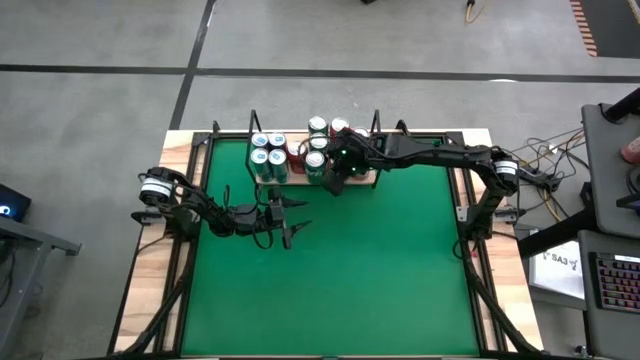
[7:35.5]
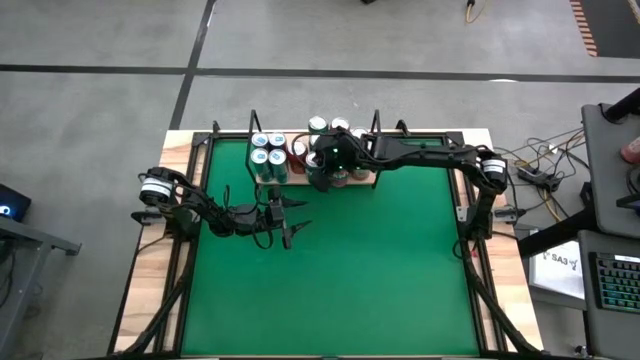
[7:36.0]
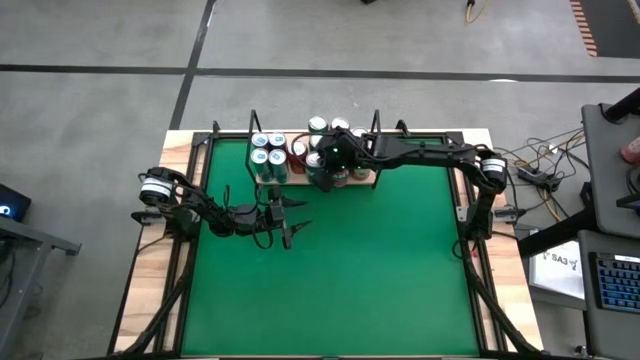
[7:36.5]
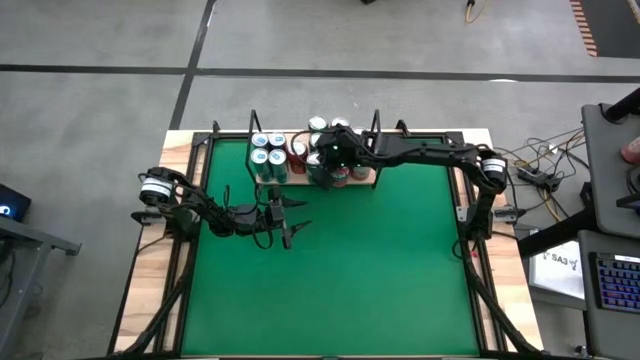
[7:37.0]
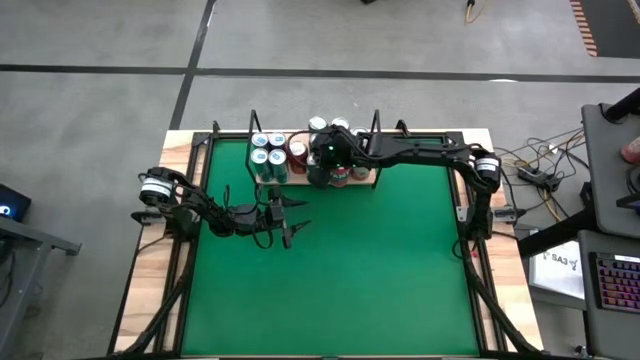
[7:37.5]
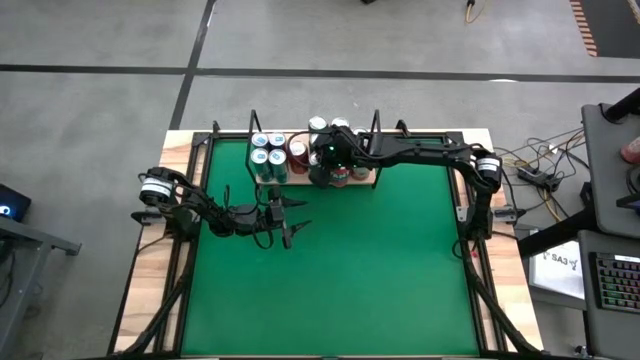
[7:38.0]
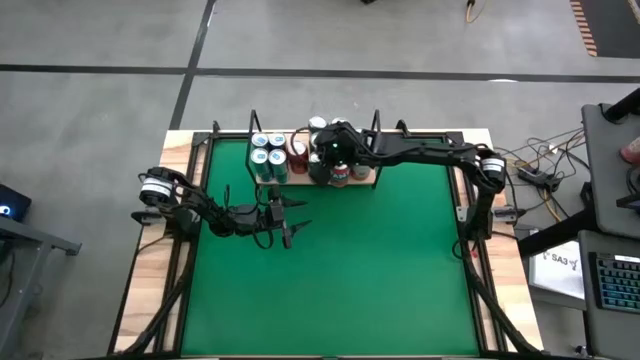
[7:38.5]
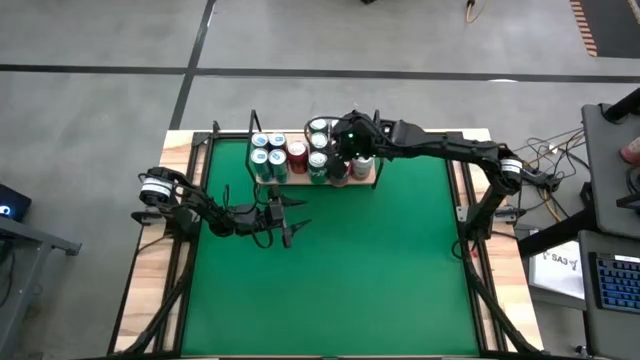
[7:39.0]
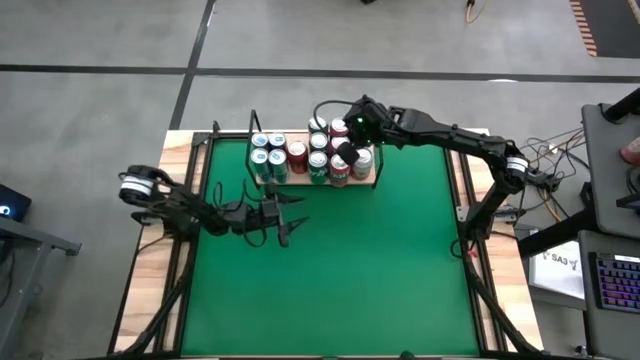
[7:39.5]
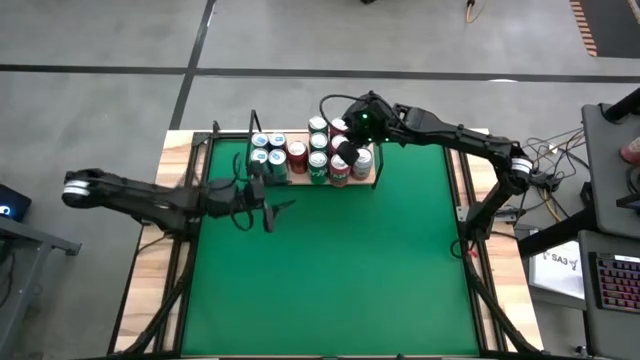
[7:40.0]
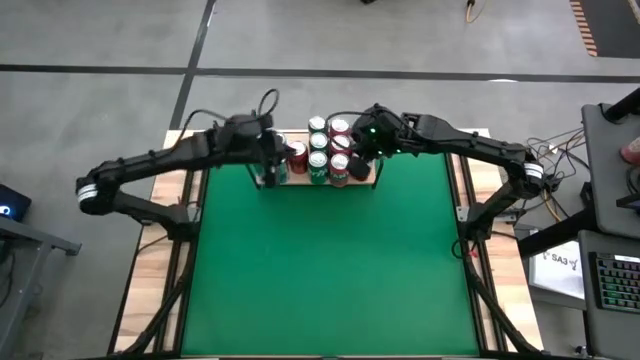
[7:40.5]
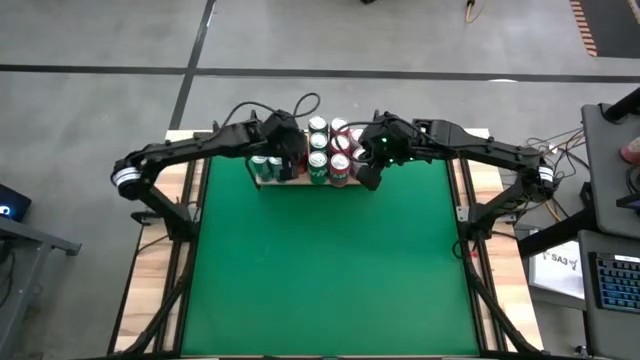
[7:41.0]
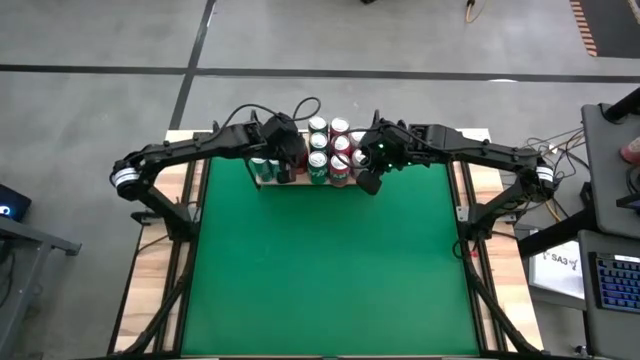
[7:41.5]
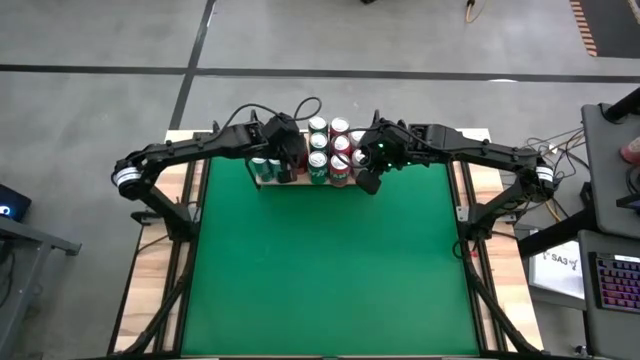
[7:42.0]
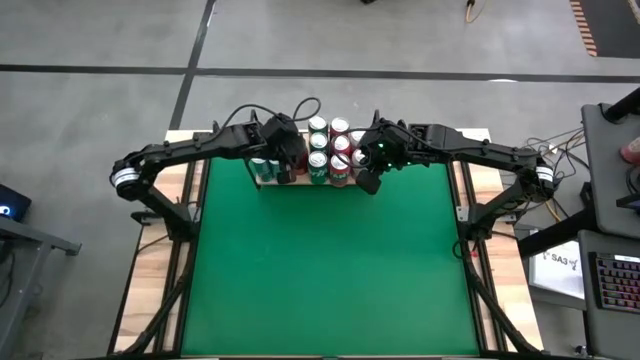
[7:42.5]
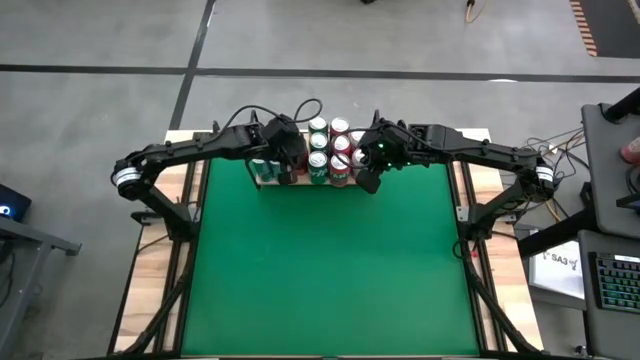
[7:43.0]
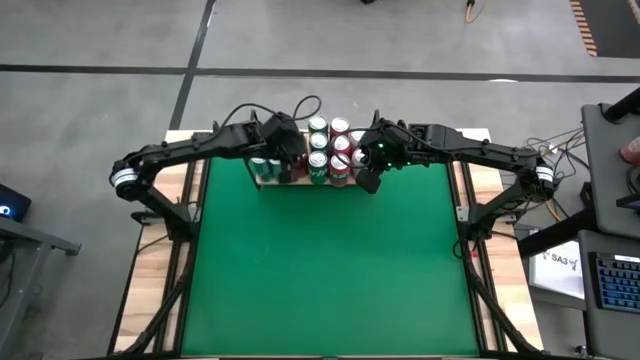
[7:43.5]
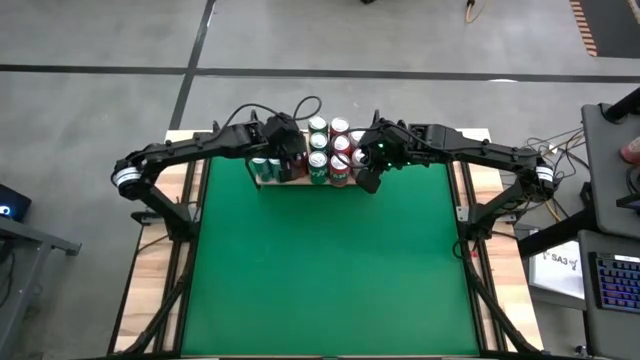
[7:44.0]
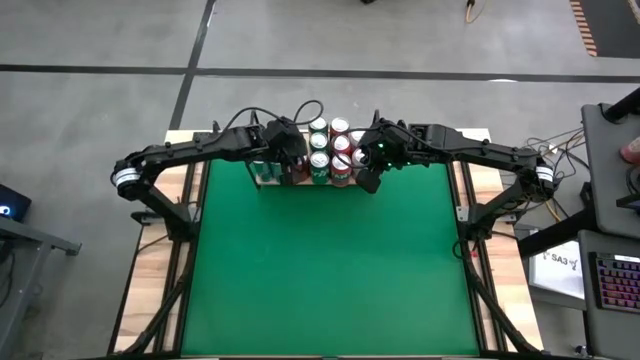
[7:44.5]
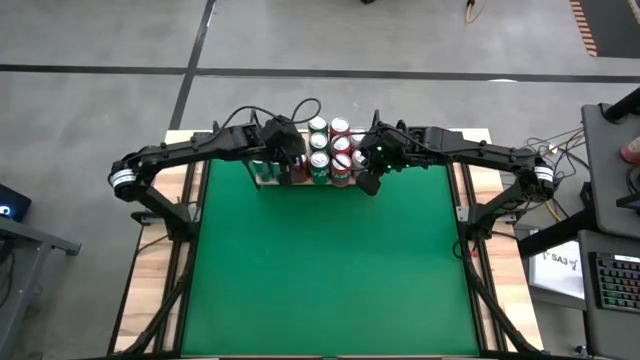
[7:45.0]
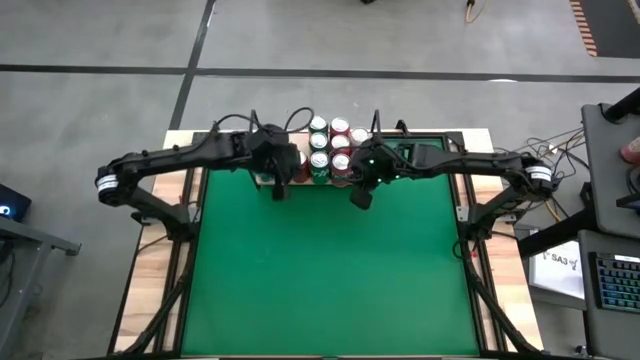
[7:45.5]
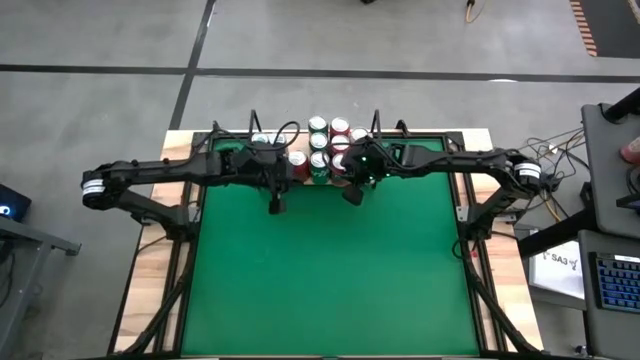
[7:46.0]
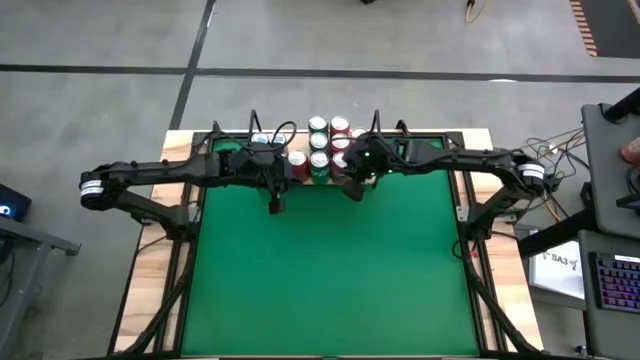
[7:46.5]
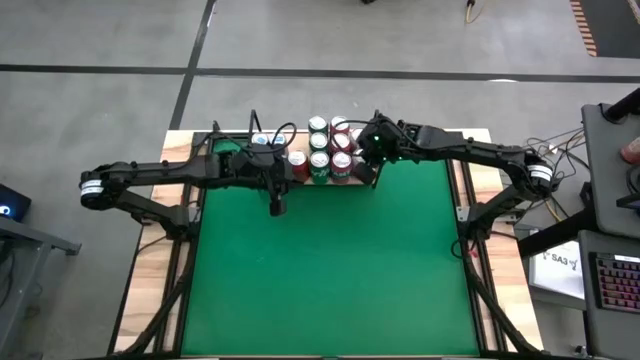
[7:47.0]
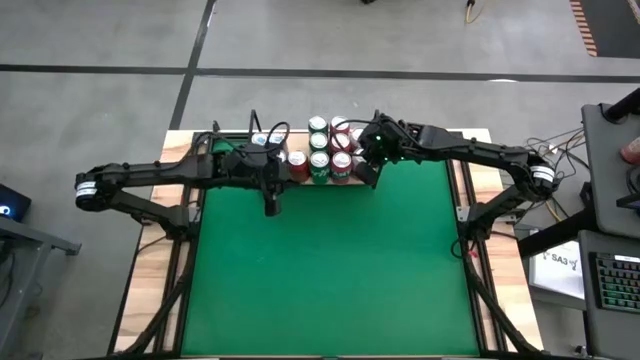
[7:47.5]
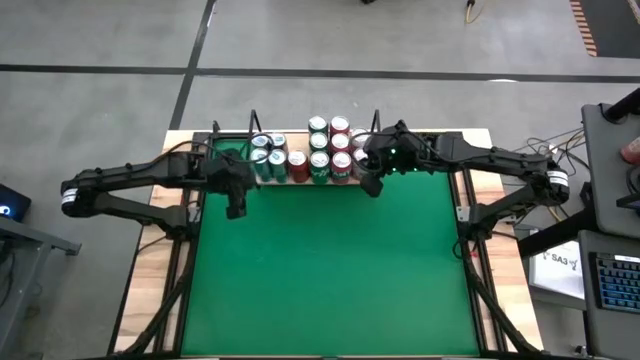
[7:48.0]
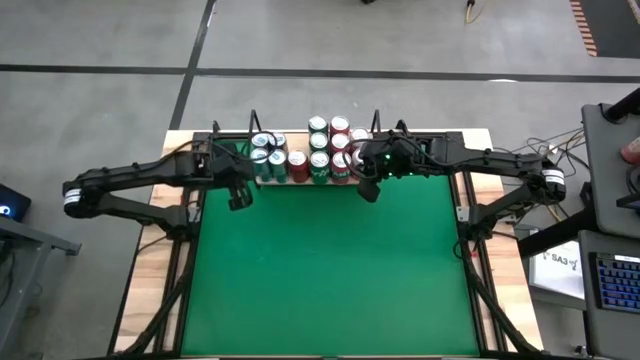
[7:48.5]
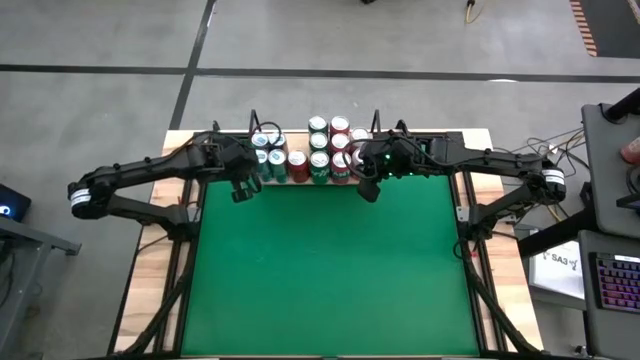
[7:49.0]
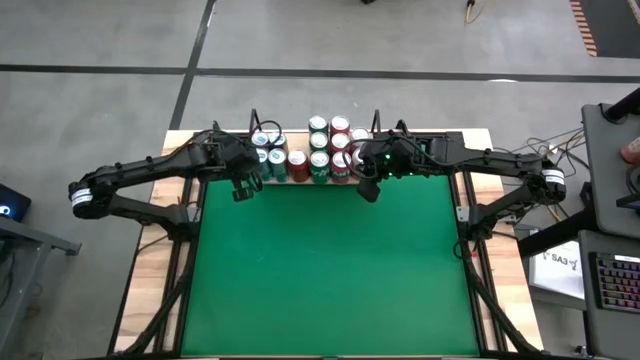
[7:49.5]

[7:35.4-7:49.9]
Task: Pick and place cans onto a shelf
Adjust the soda cans on the shelf

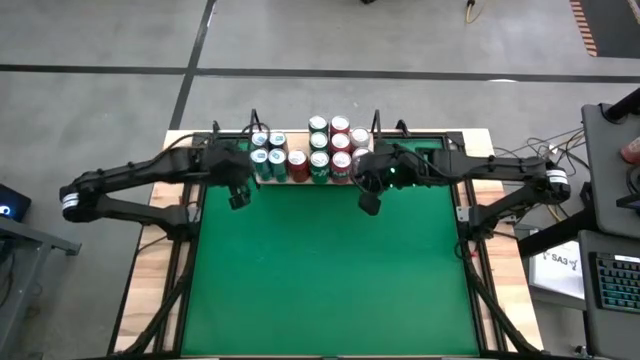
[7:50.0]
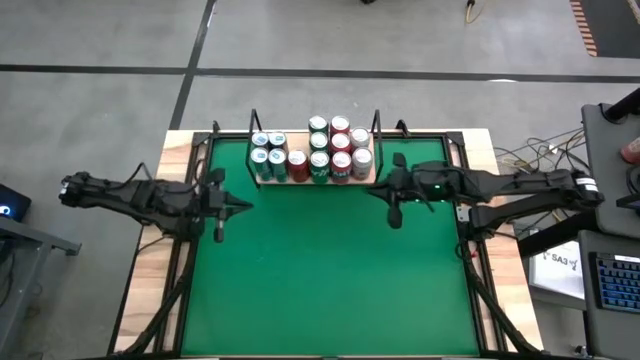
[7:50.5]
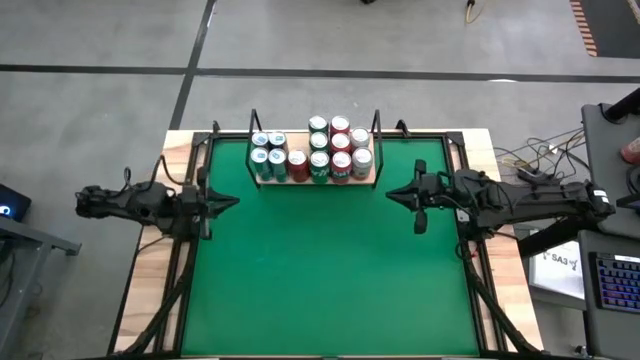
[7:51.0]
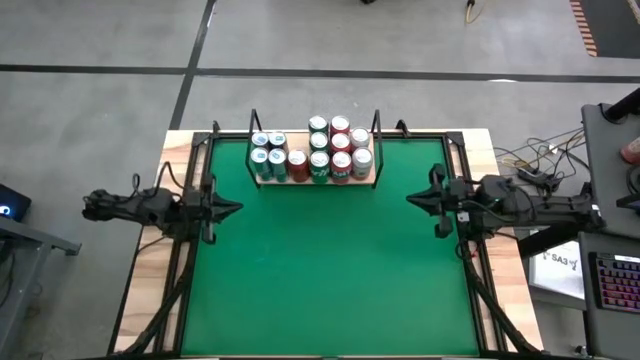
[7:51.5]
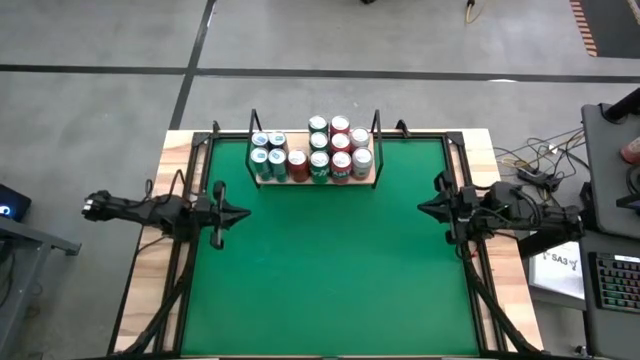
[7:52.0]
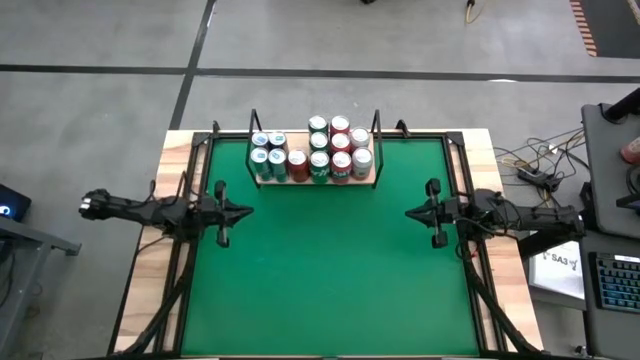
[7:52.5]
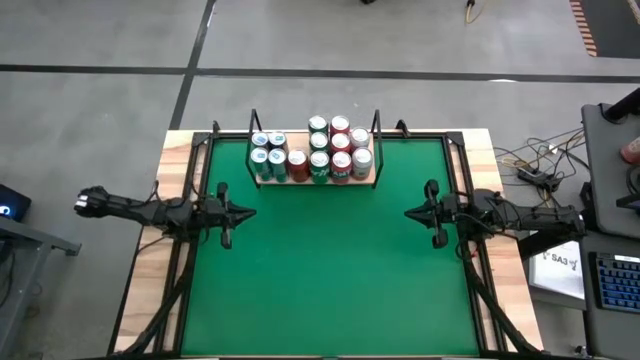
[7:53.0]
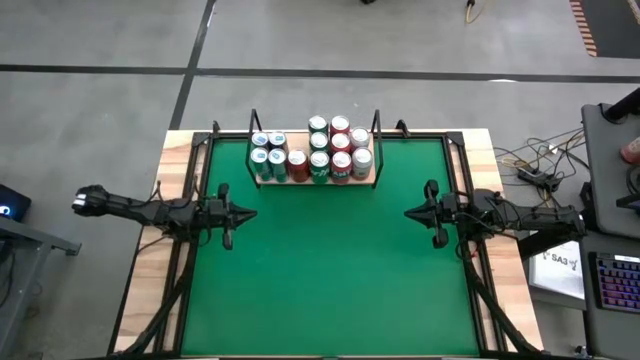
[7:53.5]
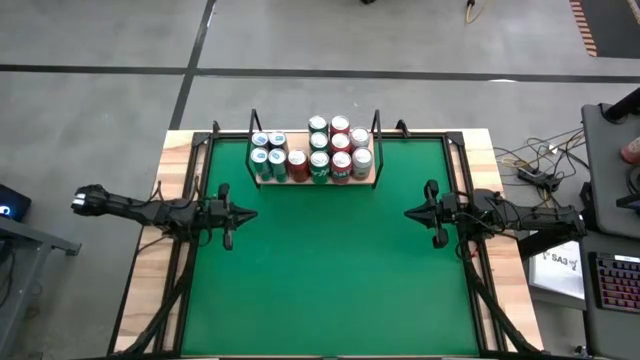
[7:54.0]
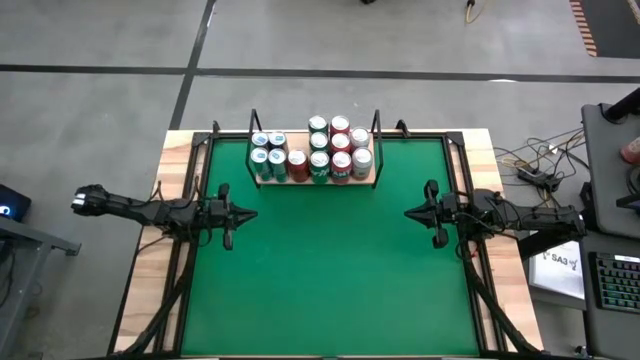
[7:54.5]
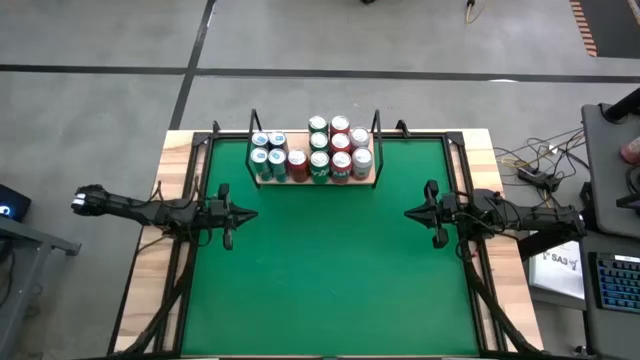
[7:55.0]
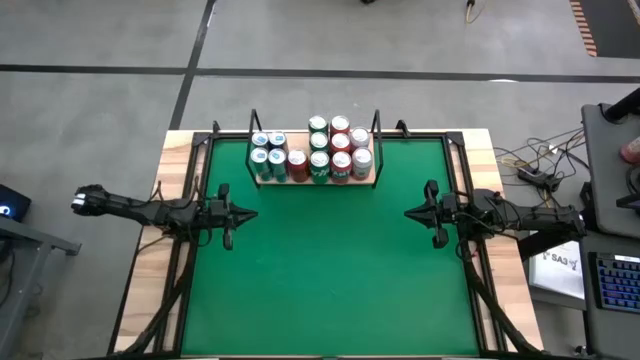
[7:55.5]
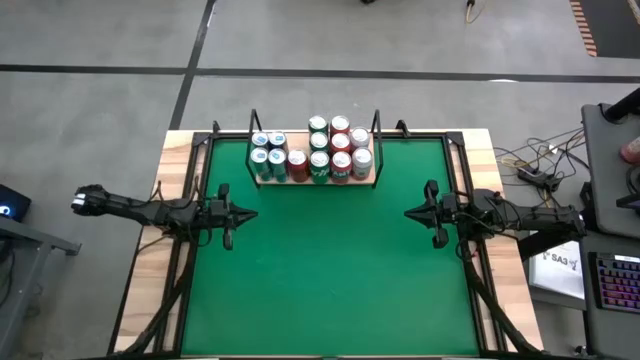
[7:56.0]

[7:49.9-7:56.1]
Return to Home Position
